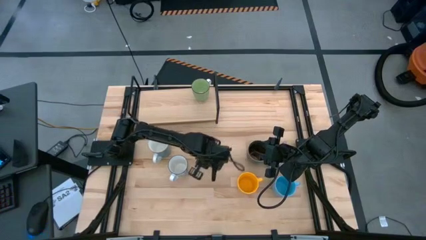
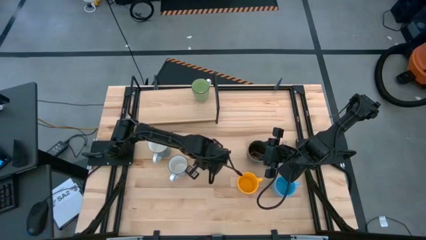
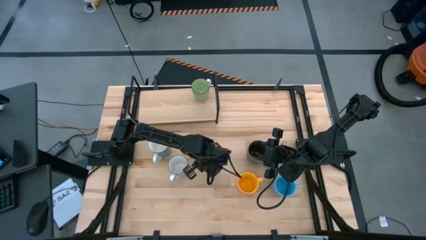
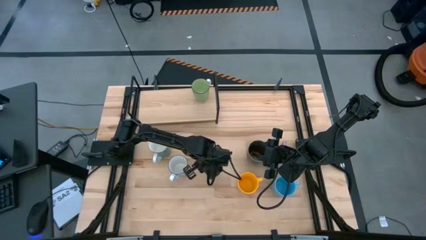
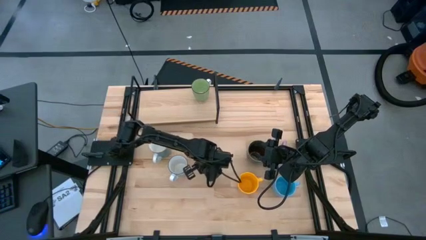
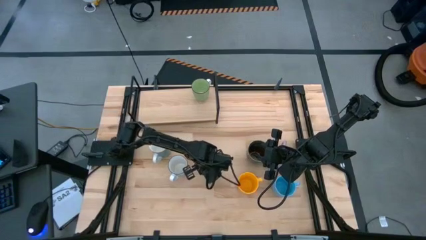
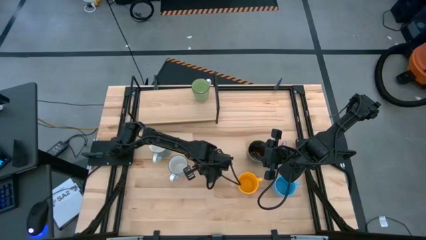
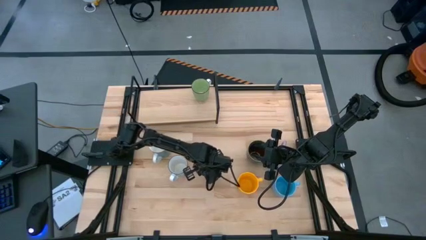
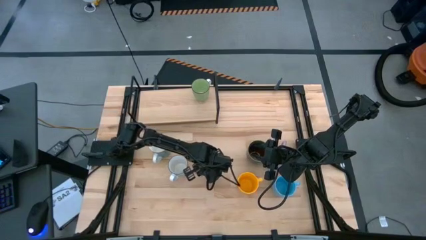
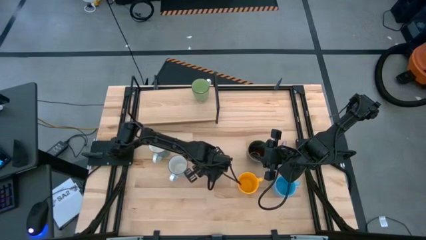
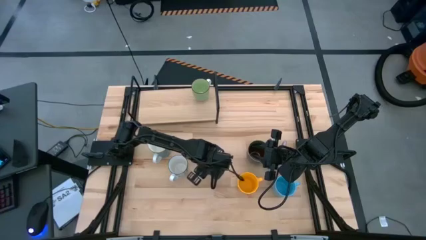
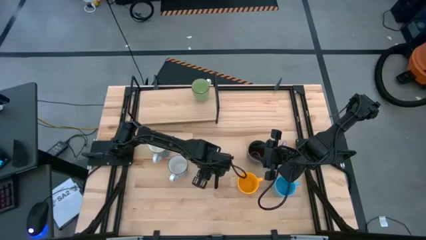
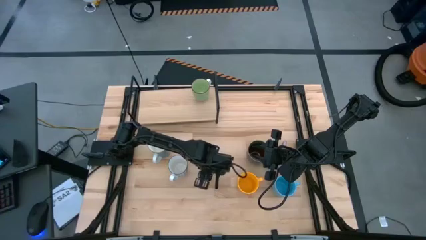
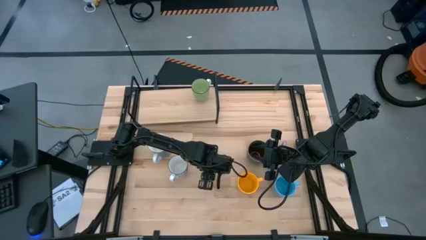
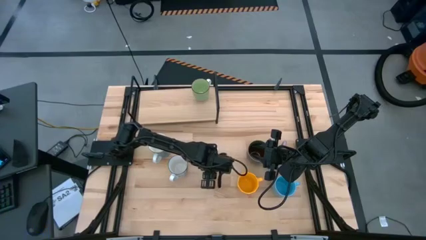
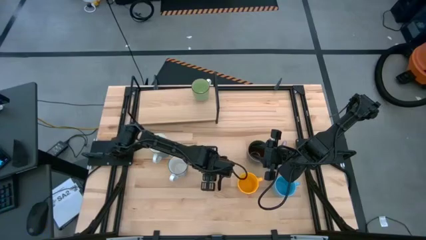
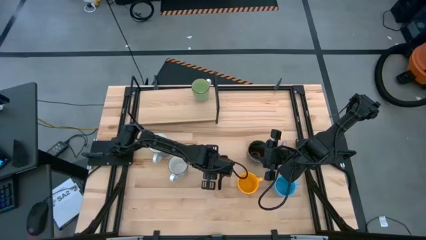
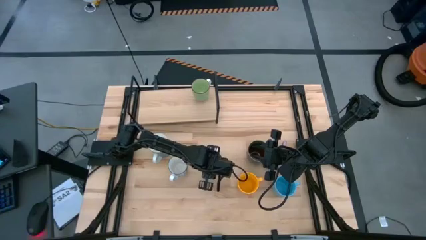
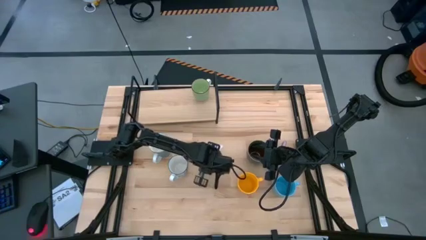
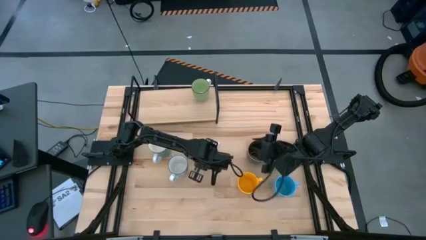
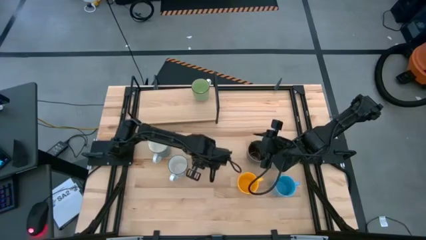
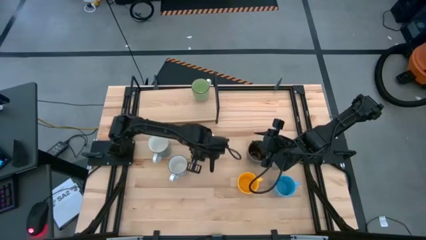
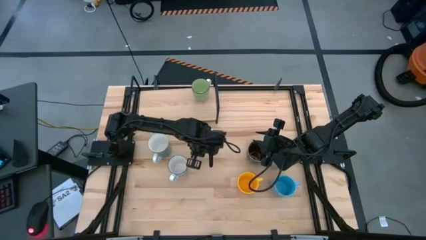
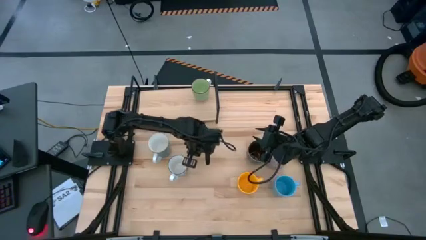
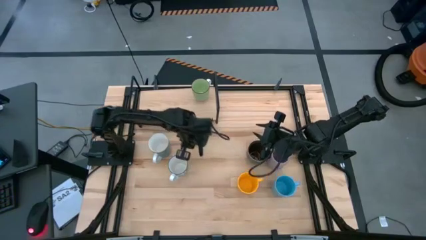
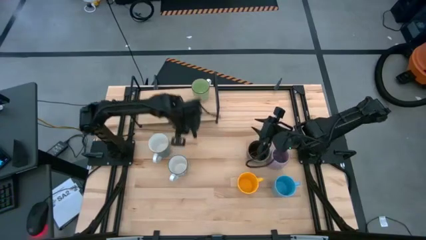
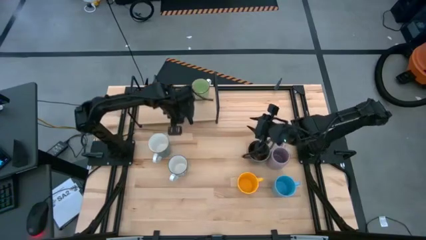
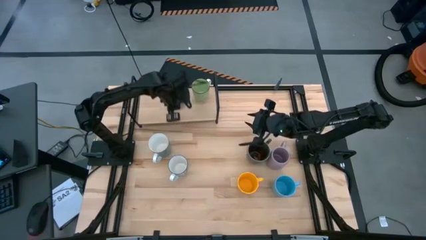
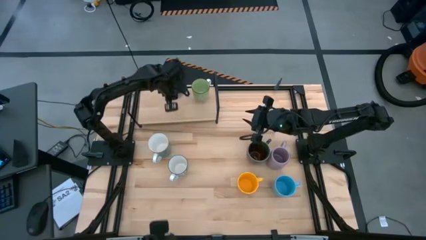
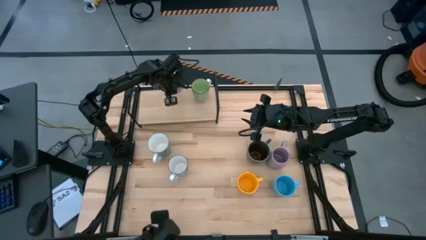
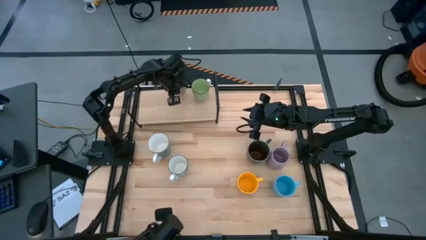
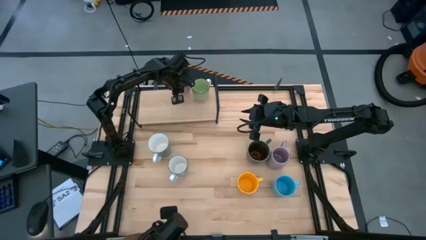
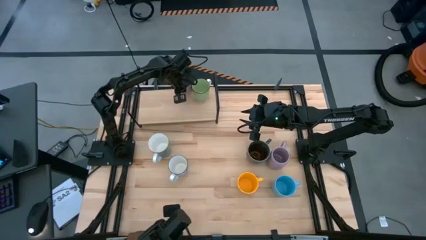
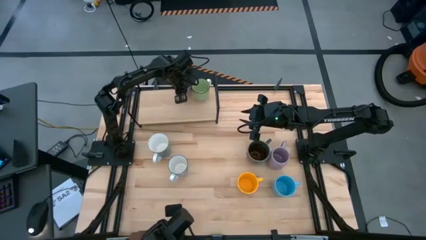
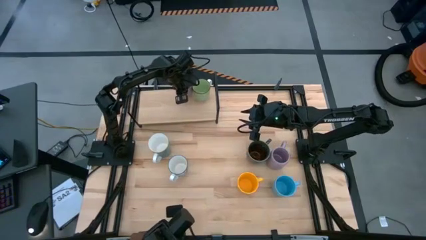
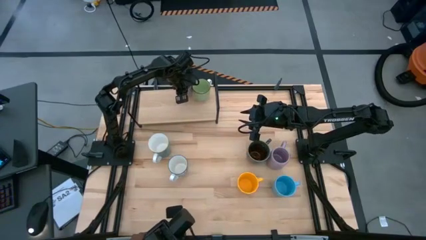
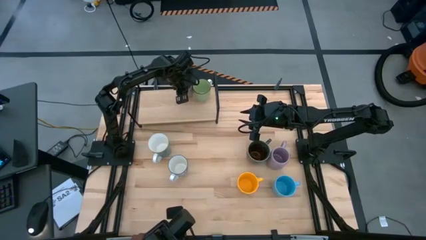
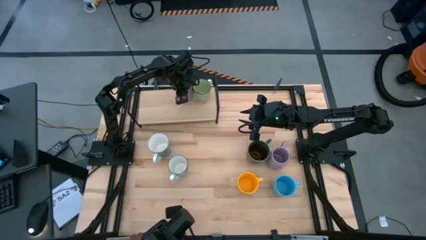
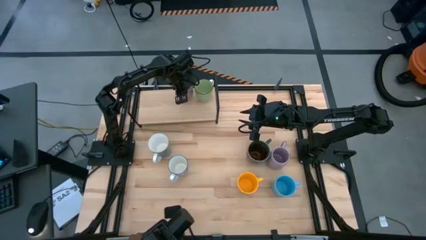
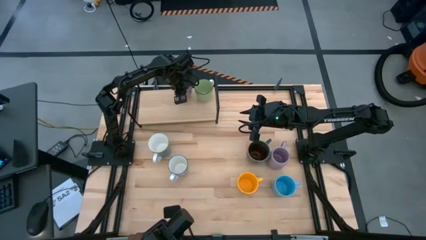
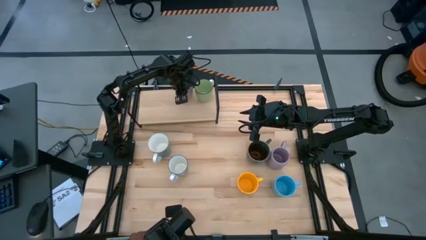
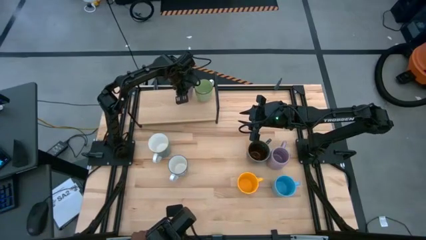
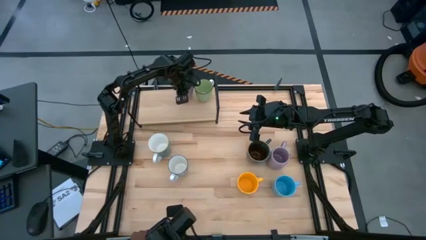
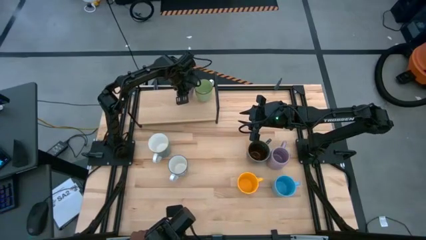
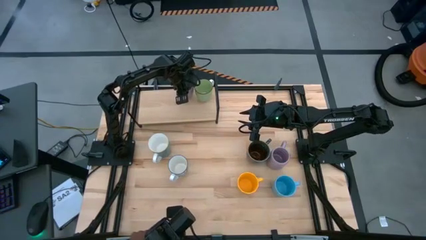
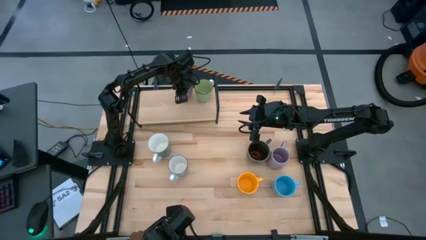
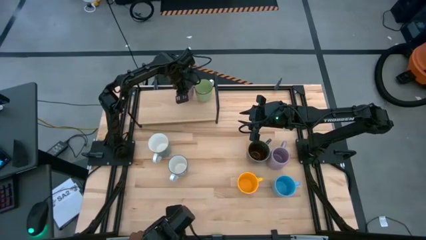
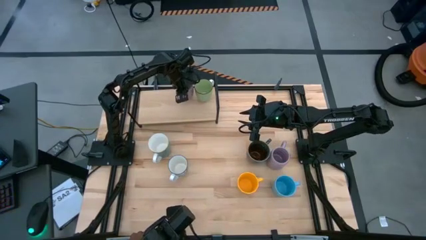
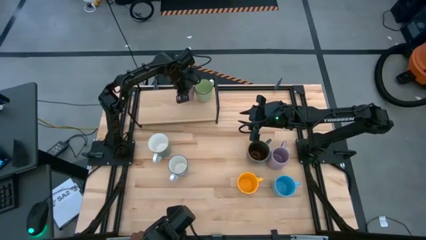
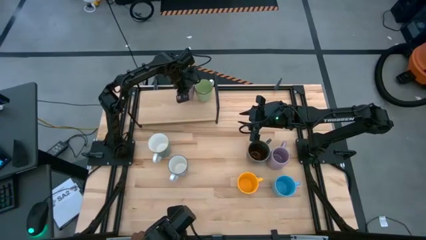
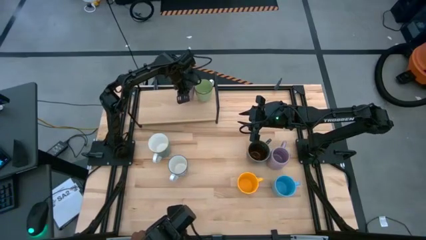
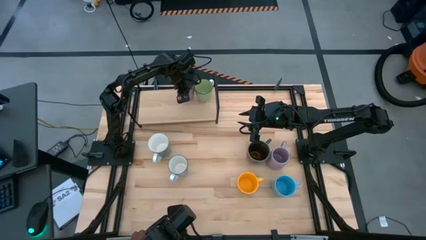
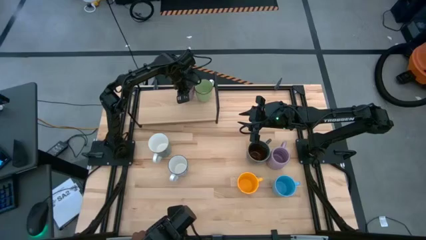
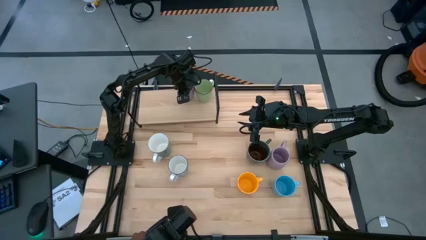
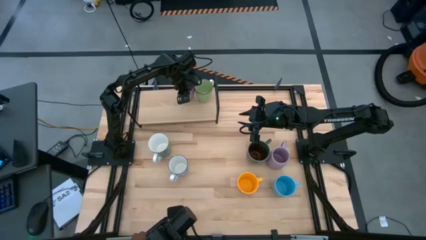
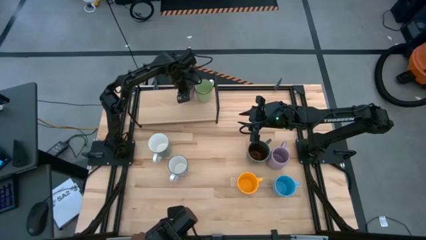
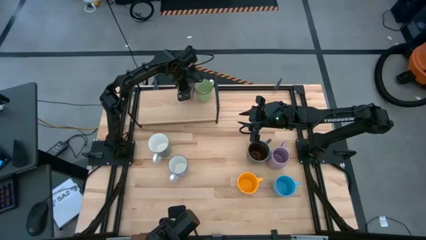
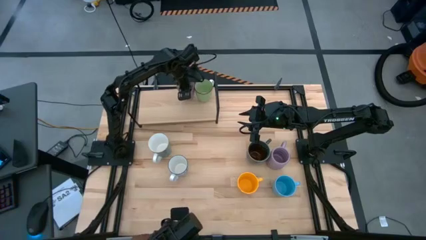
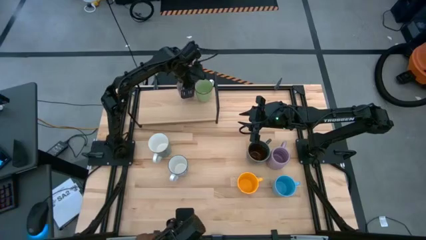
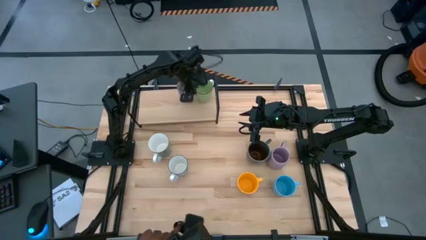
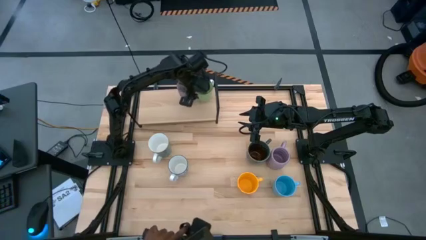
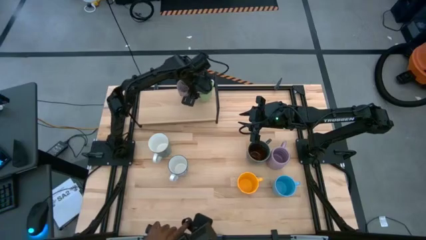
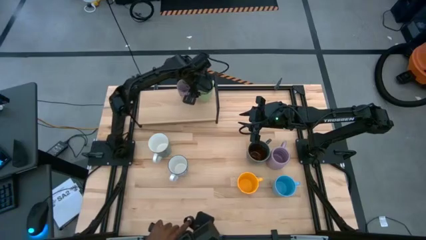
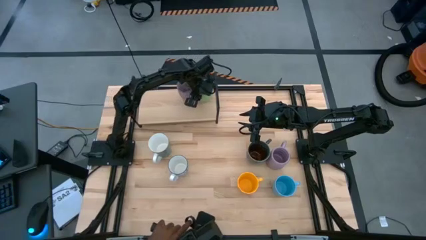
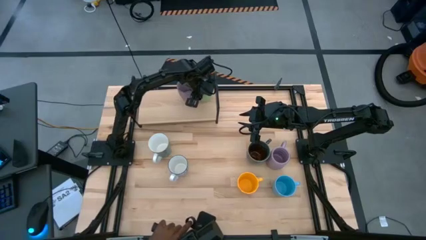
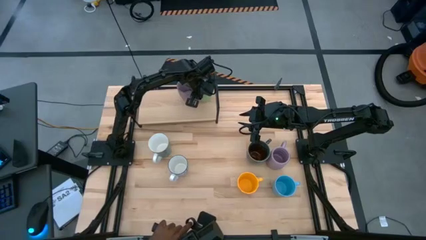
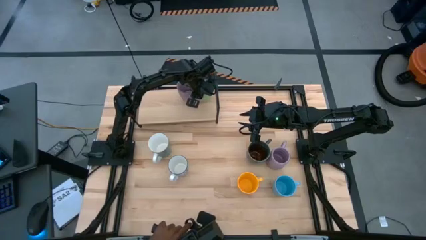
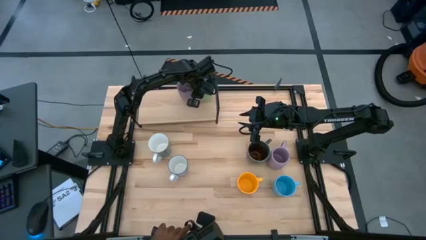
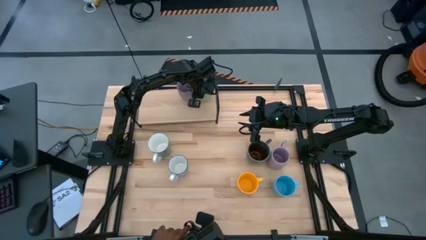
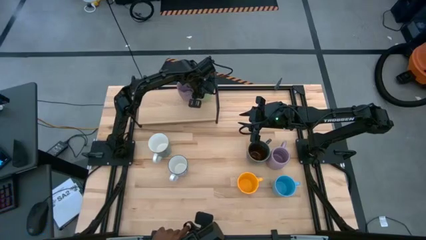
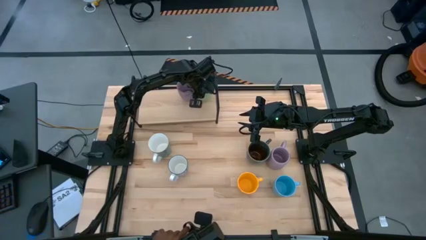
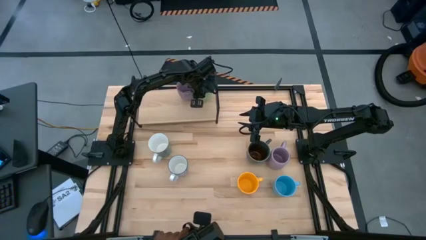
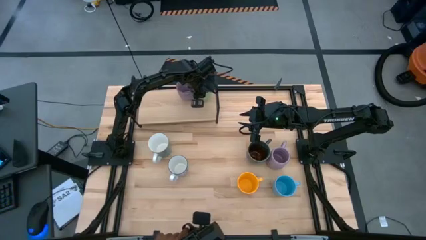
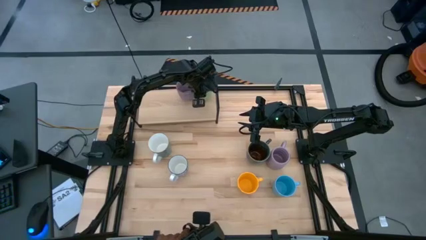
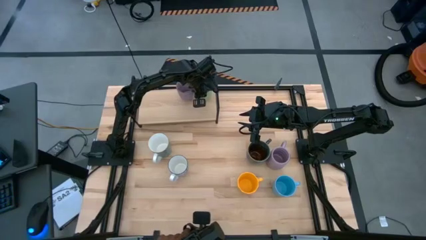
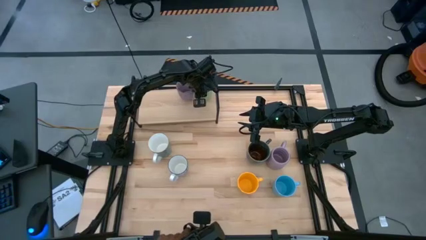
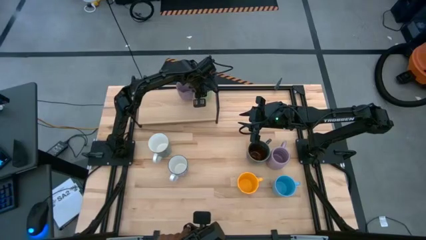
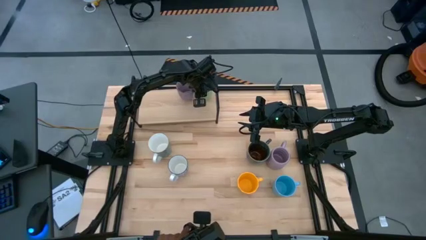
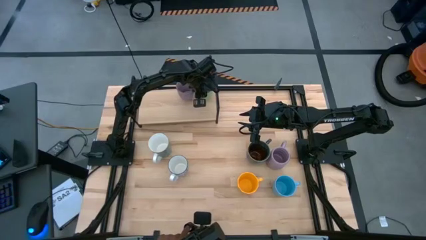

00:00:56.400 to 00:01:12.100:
Task: Place coffee mugs
Put the purple patterned mug on the shelf

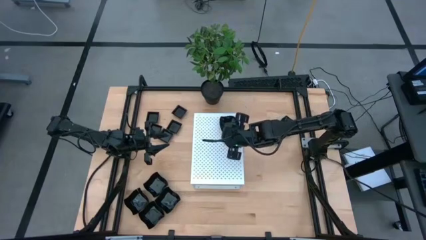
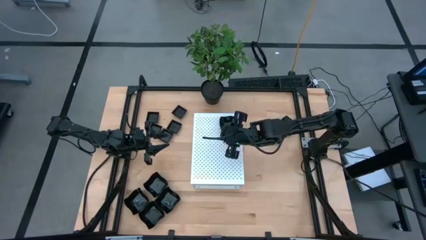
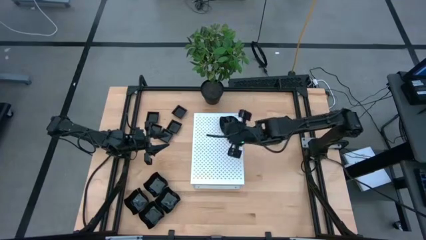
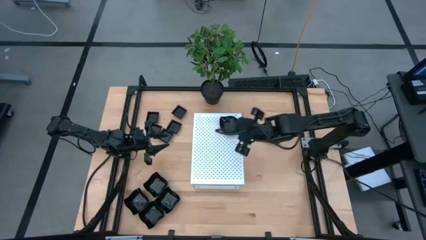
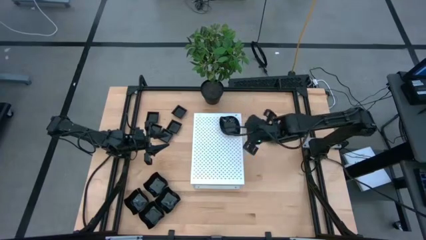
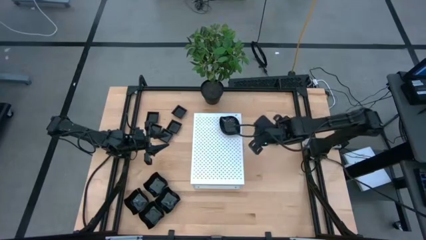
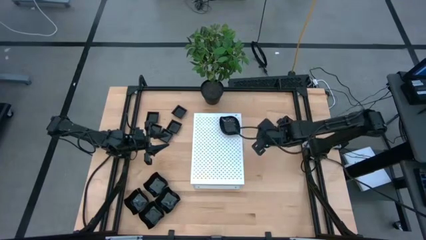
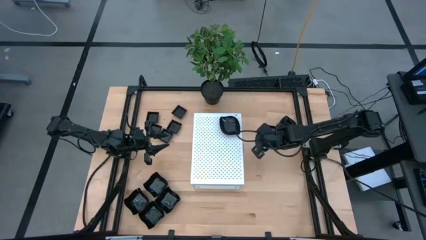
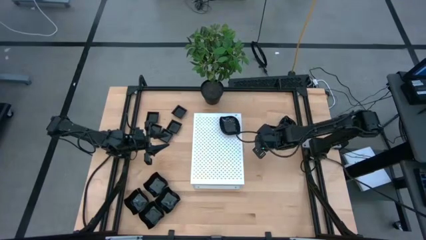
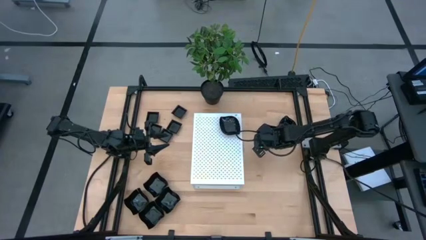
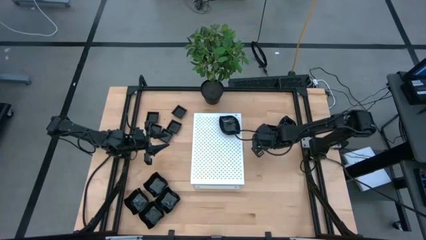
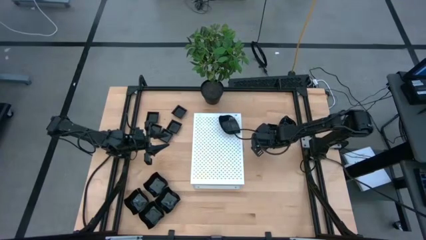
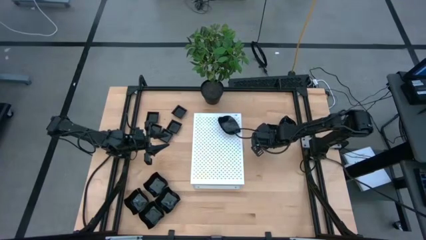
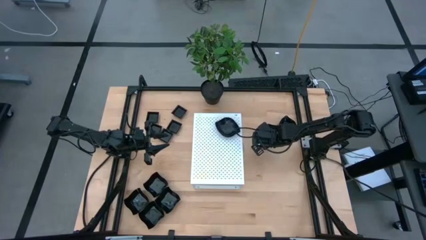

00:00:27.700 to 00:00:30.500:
Task: Pick & Place Mini shaped plates
Stack the black leaf shaped plate on top of the black leaf shaped plate on the shelf
